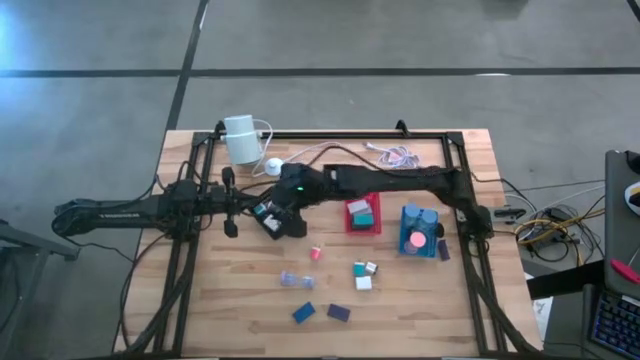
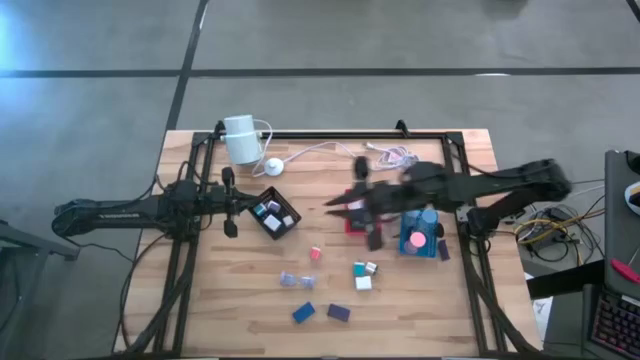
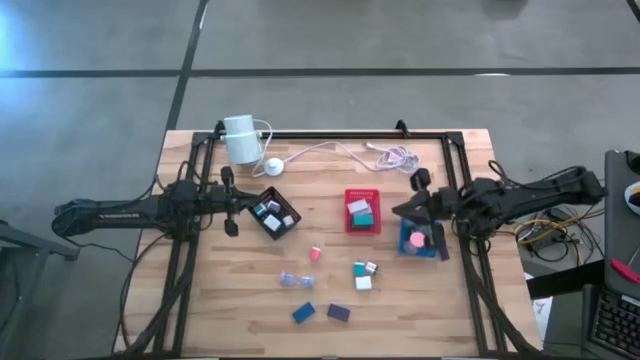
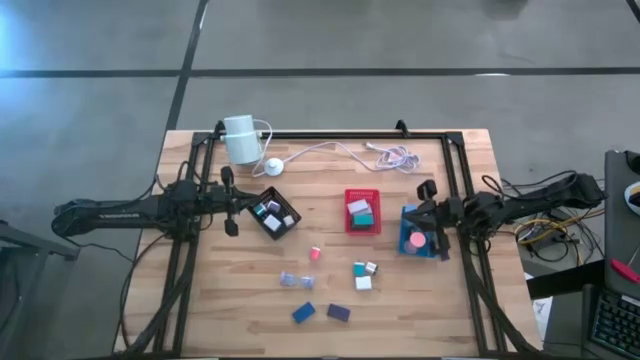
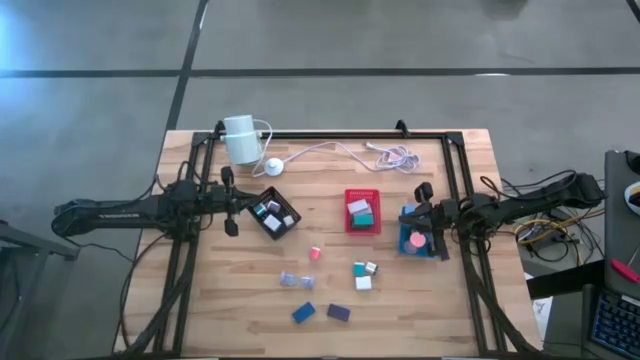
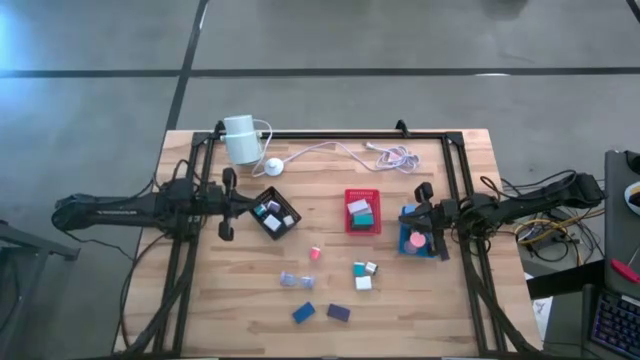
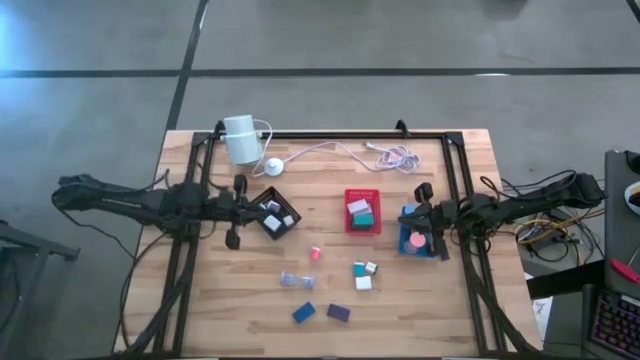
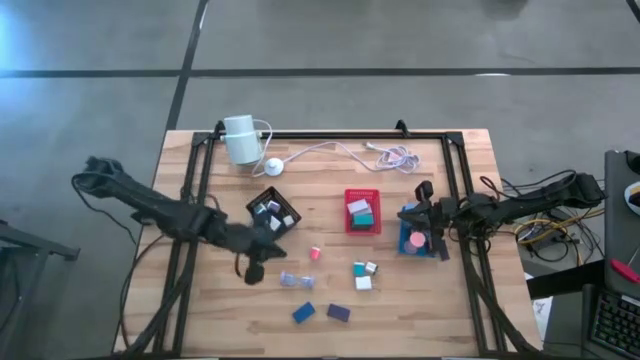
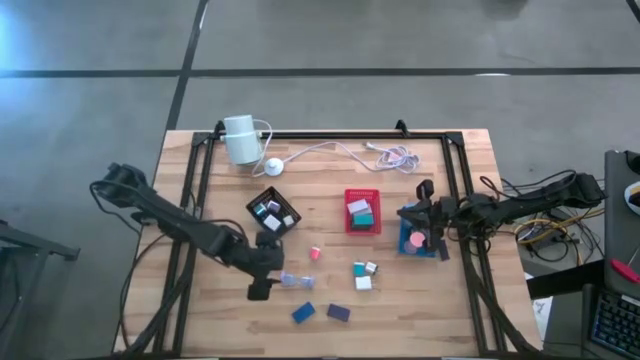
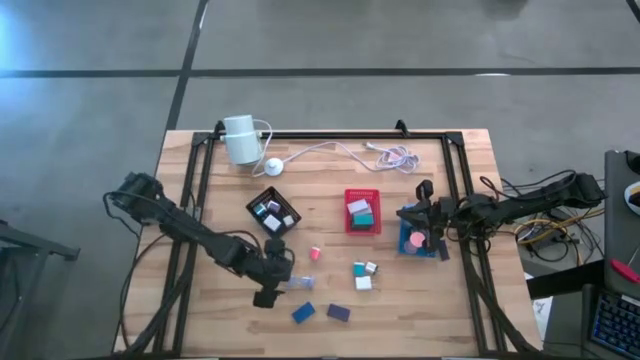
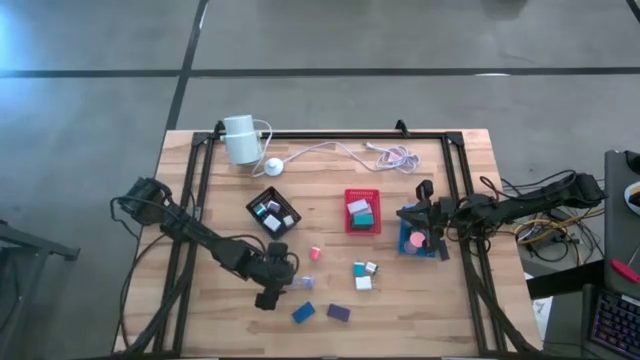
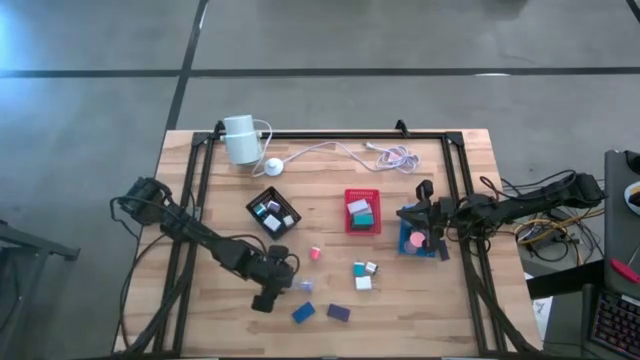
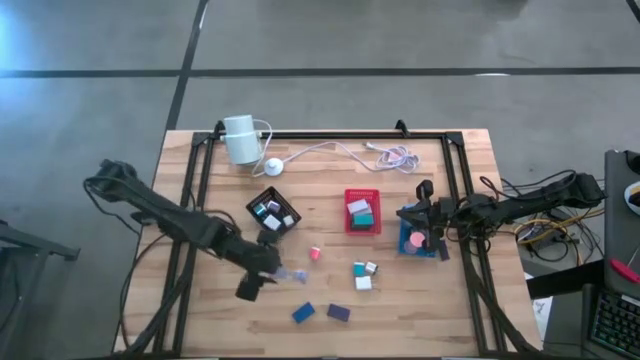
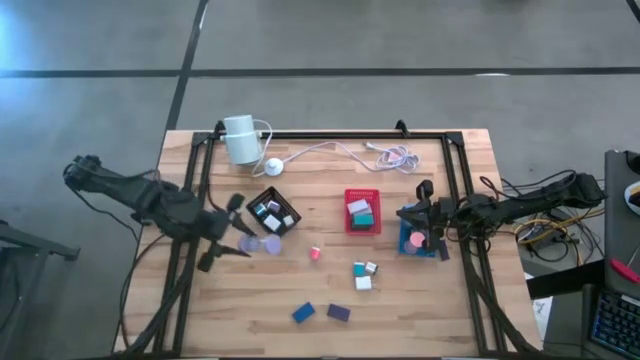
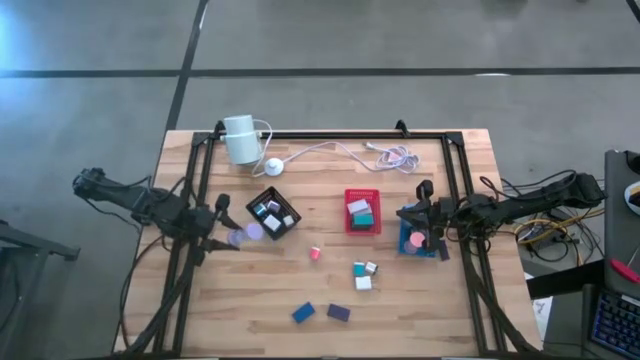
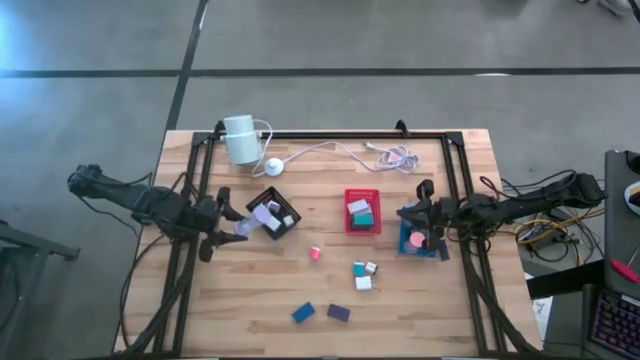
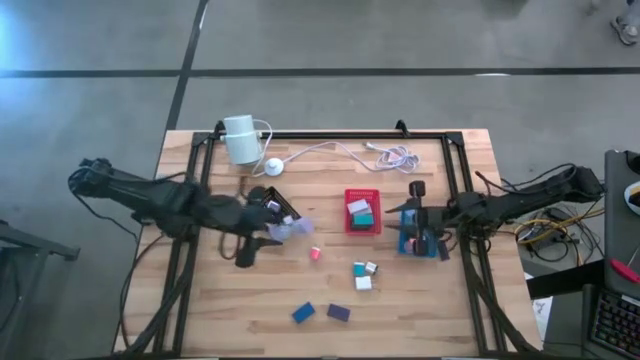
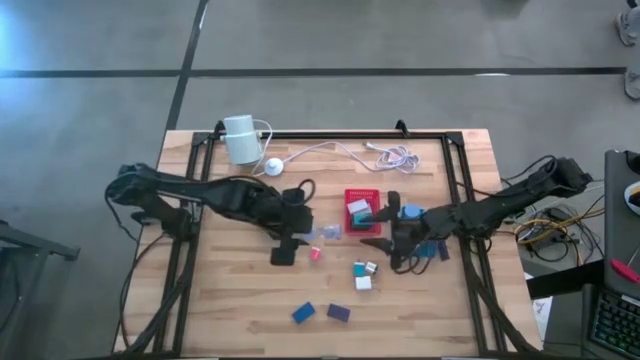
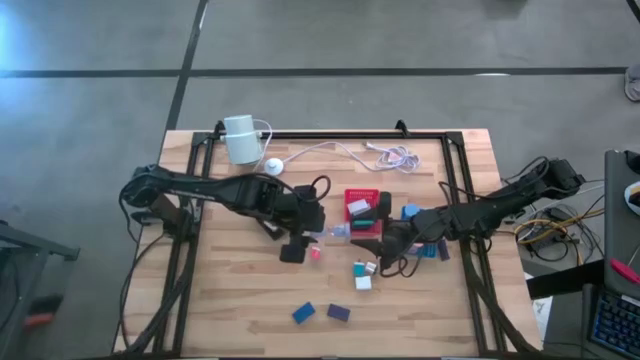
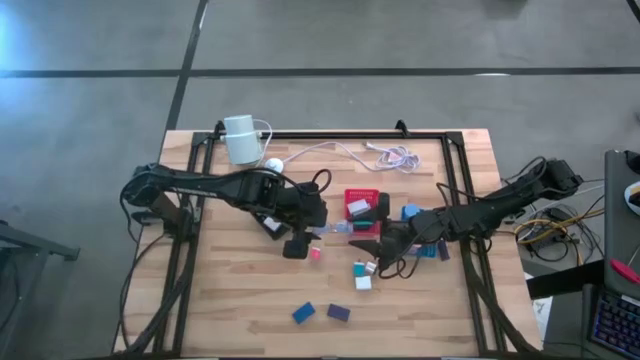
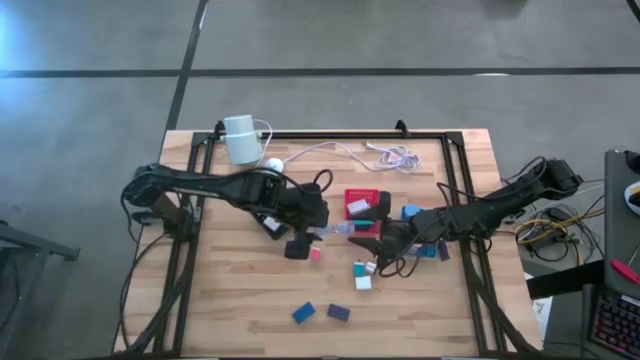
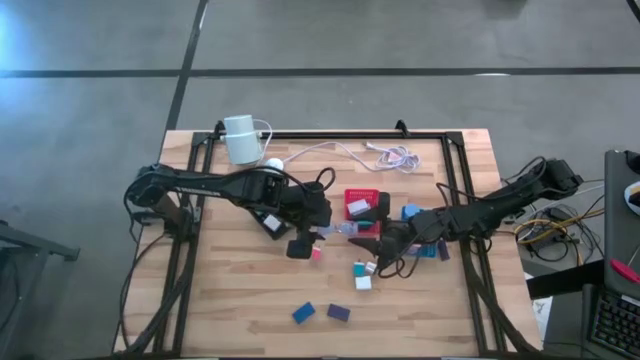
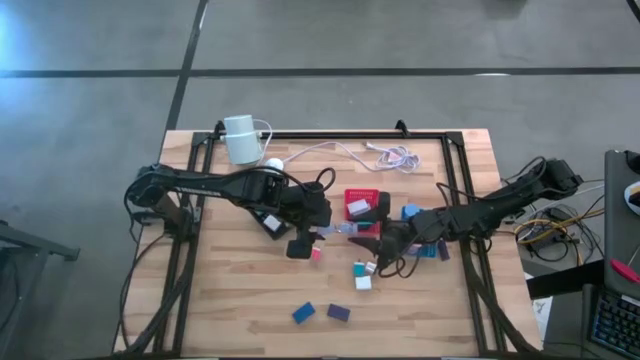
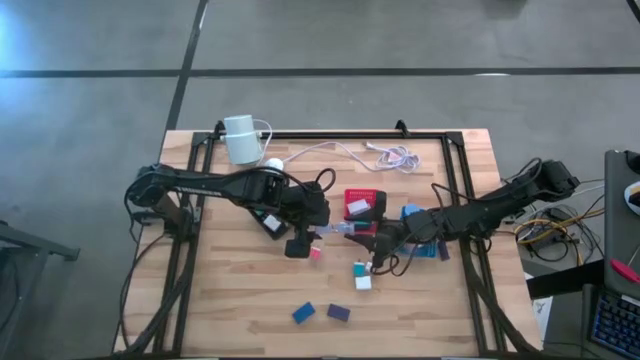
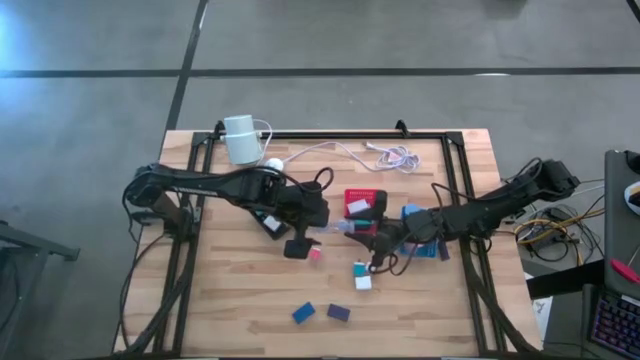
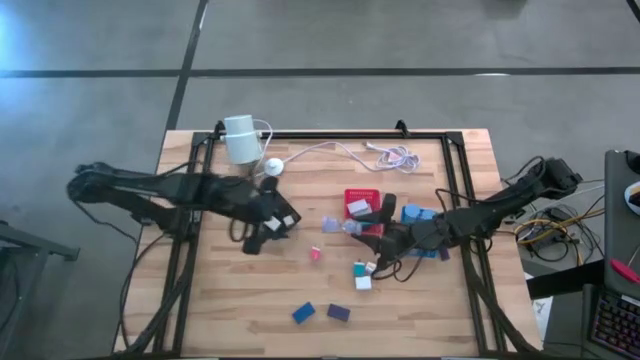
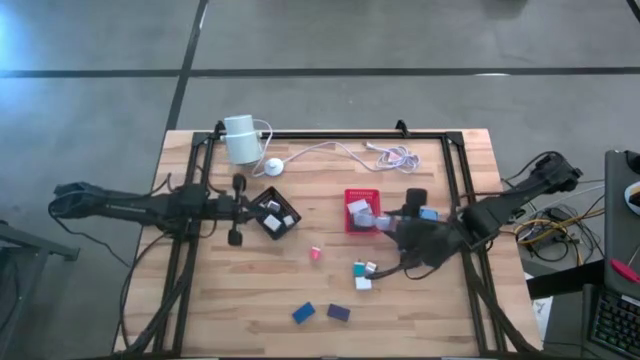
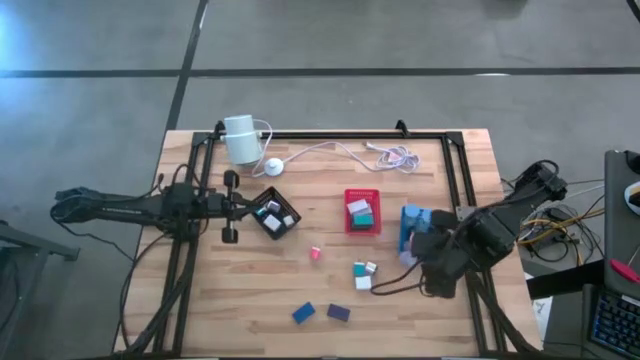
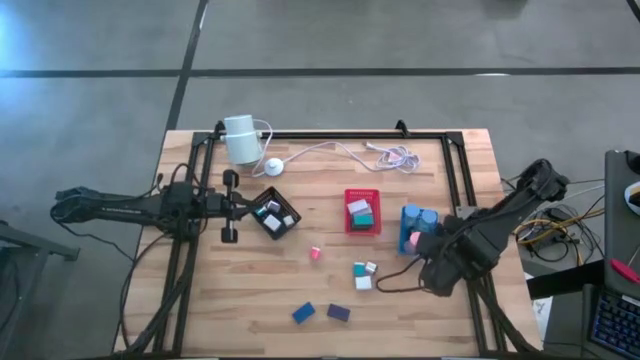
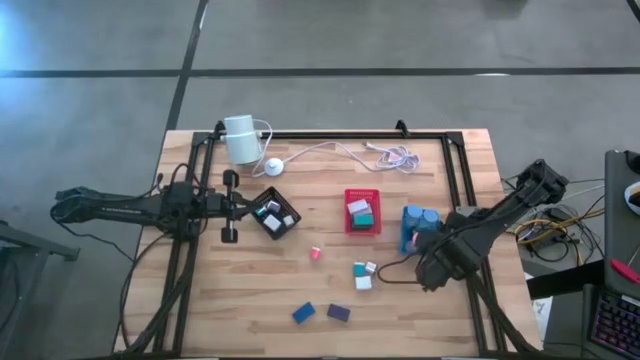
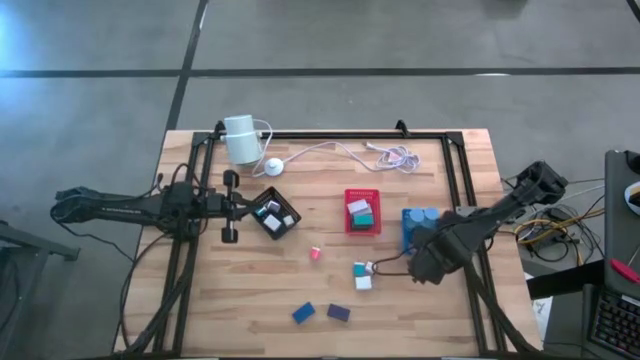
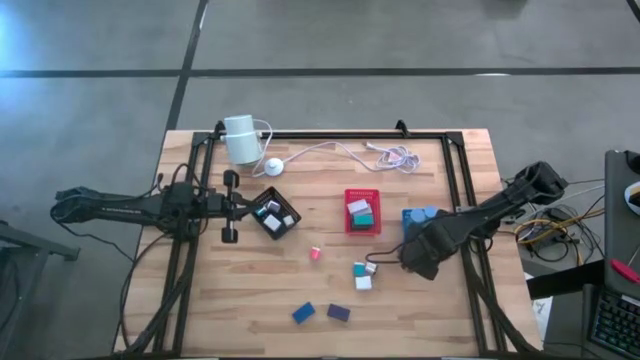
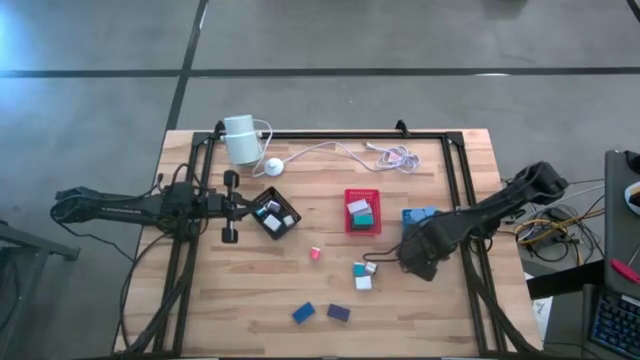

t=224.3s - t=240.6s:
Task: Pick & Place Office items
Put the purple hourglass into the blue bin
